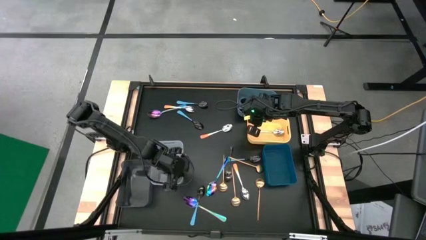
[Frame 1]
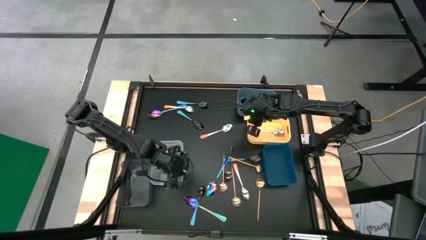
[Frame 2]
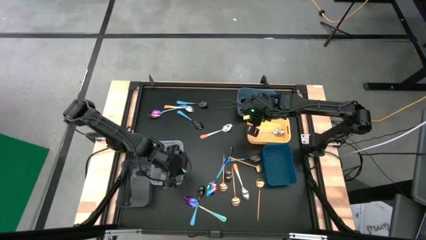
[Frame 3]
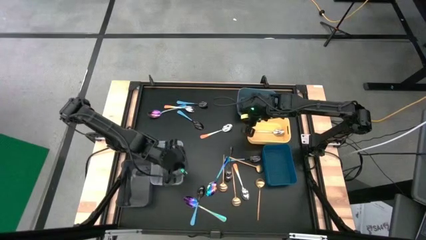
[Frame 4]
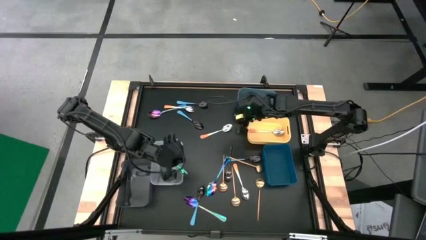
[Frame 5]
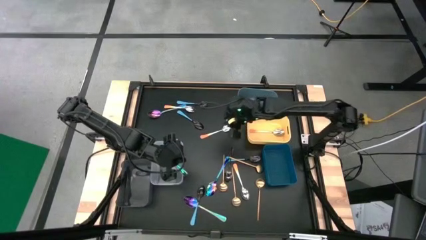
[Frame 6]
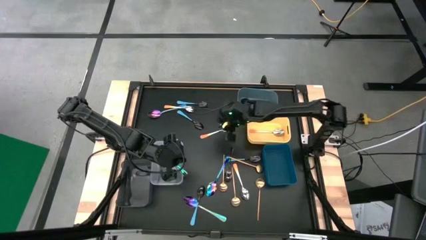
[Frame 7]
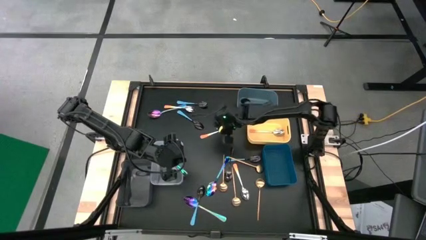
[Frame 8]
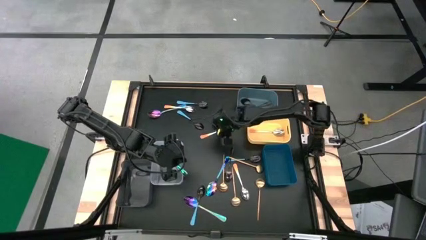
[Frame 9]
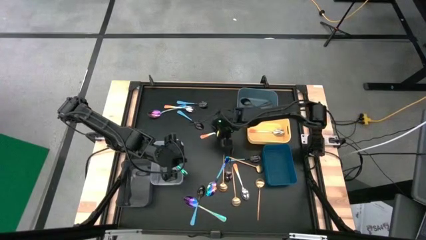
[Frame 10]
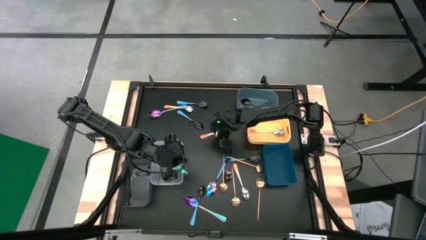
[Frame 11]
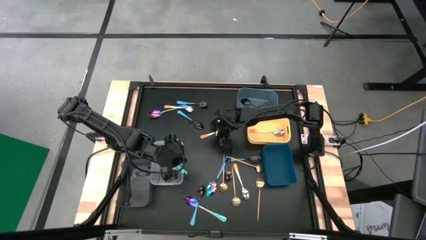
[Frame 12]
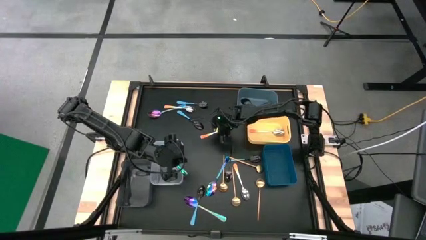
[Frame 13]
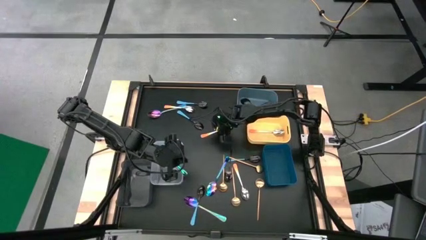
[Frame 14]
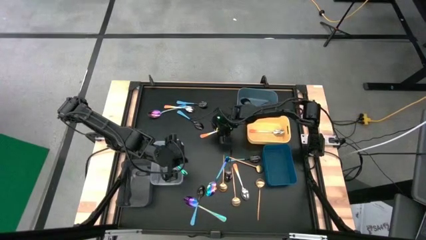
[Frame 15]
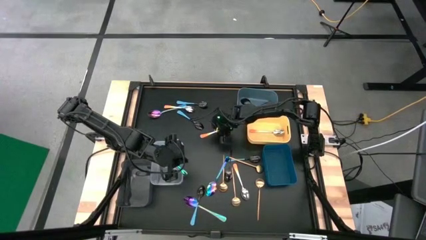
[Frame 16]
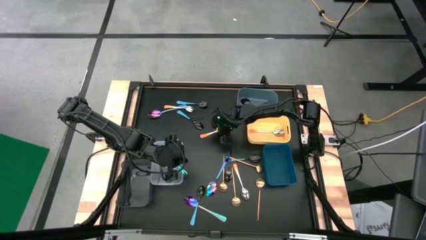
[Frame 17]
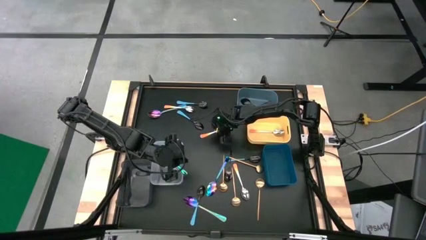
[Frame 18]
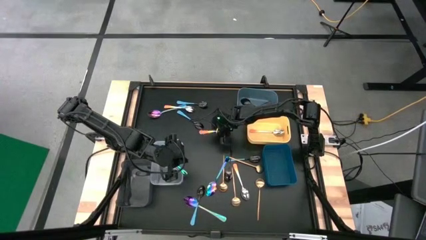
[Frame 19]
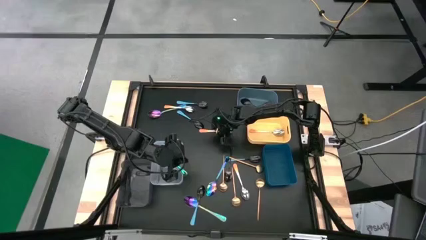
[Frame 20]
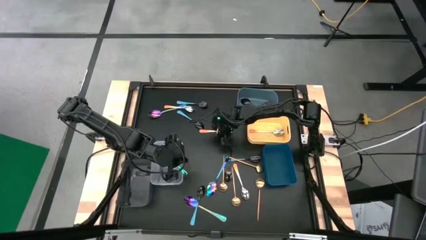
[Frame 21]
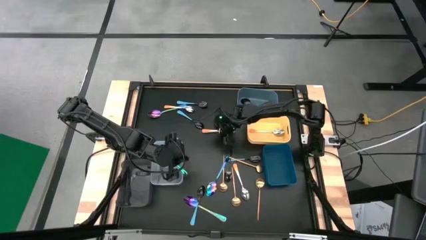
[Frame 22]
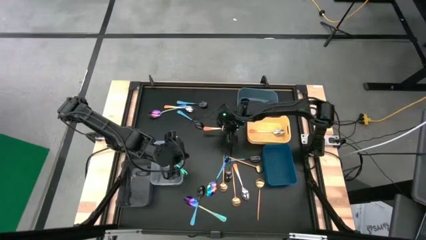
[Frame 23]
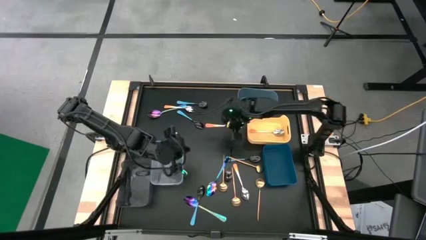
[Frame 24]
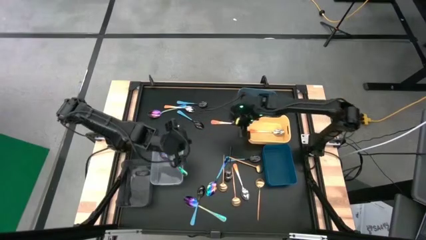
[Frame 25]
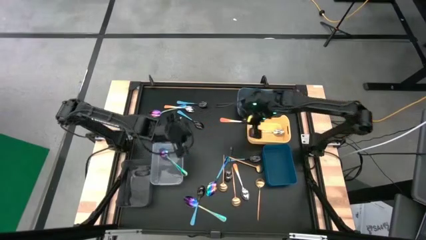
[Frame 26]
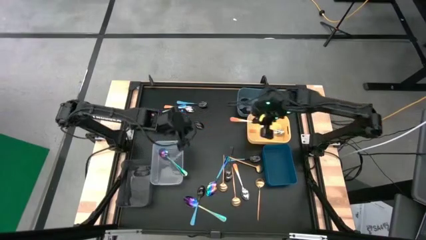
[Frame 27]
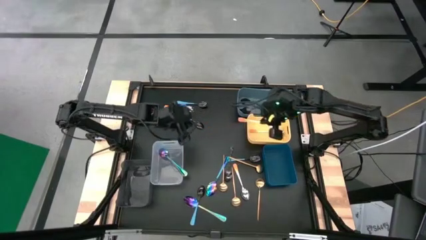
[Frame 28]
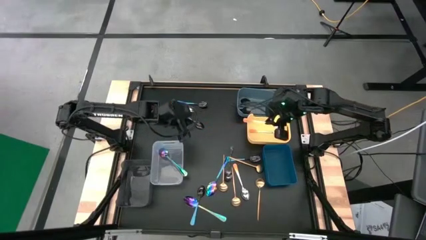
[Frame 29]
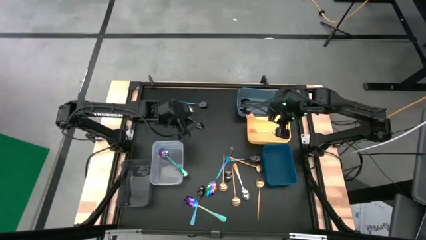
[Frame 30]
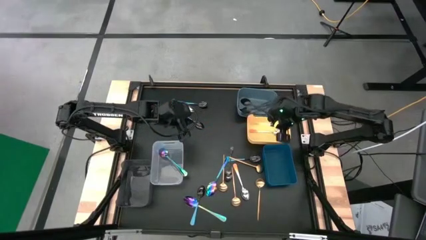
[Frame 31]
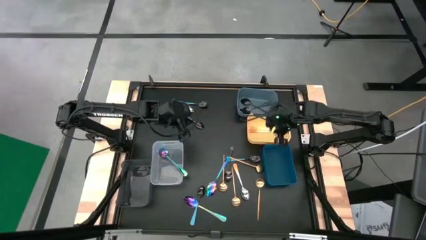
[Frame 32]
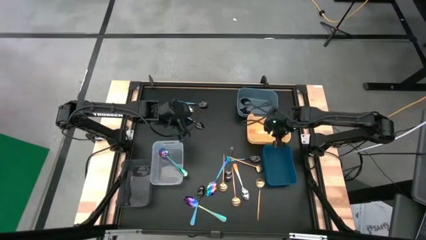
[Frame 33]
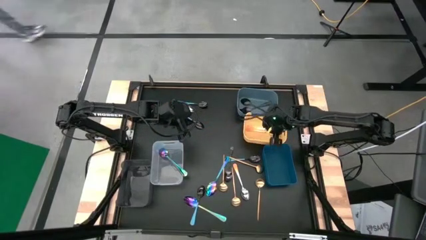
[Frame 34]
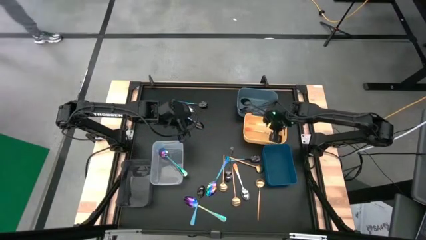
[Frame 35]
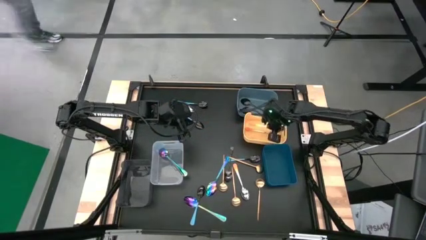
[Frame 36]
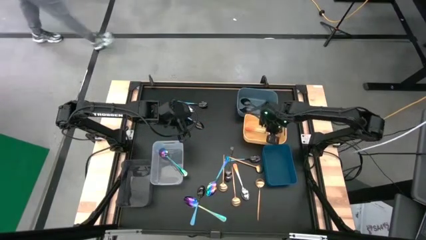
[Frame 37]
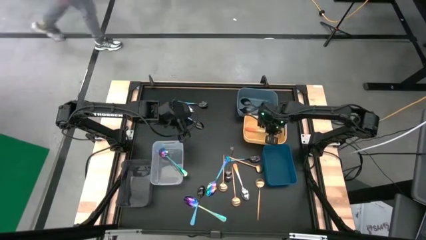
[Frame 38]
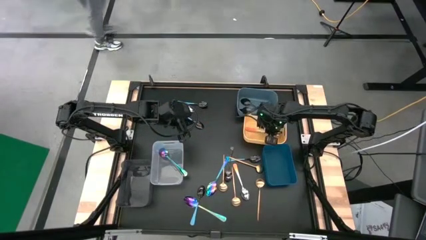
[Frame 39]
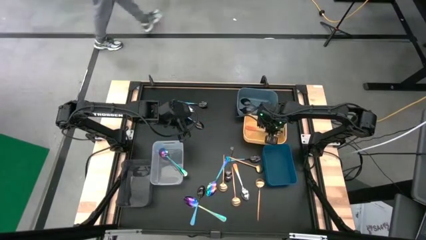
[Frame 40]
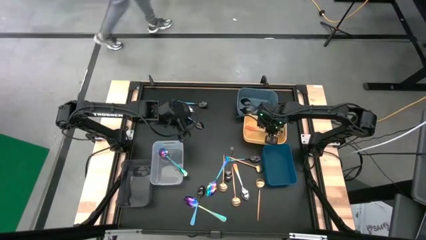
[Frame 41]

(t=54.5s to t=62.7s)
Task: Sort silverware by color (type)
Put the orange spoon into the yellow bin

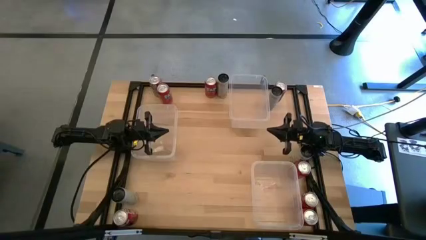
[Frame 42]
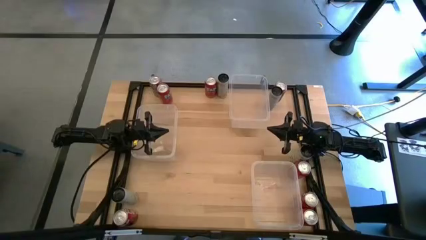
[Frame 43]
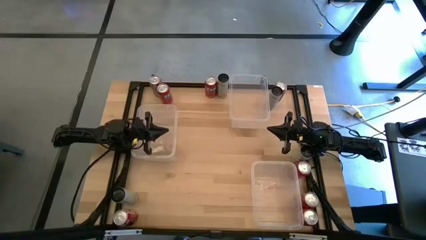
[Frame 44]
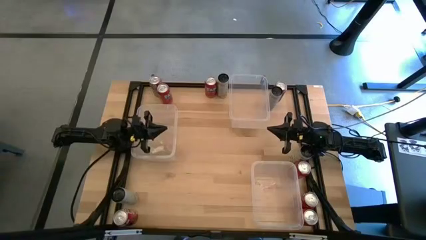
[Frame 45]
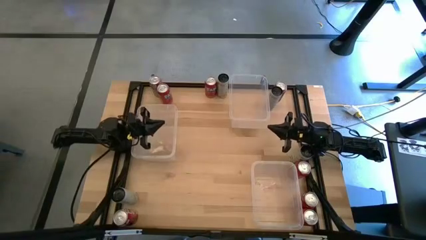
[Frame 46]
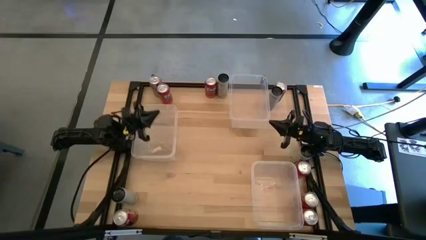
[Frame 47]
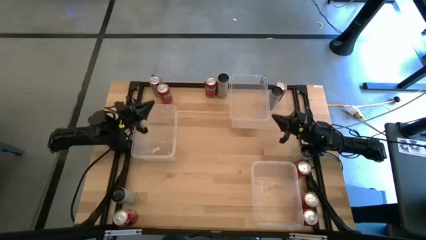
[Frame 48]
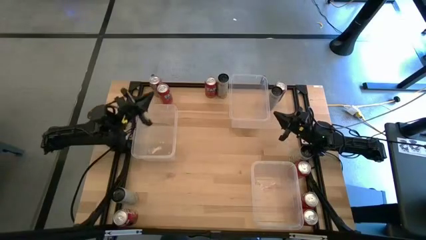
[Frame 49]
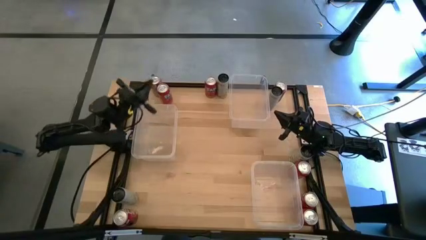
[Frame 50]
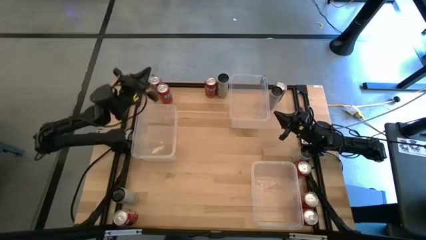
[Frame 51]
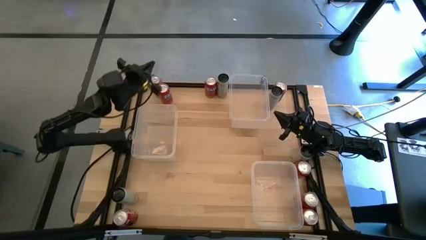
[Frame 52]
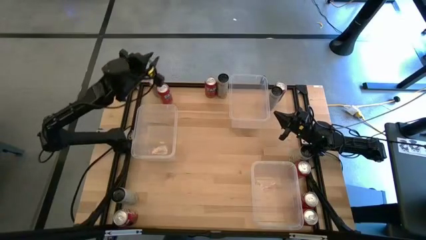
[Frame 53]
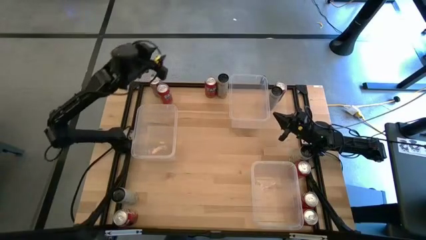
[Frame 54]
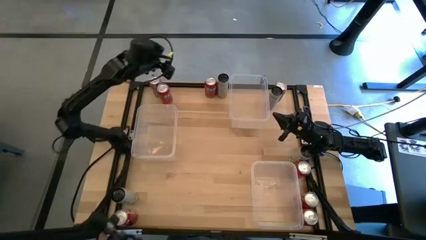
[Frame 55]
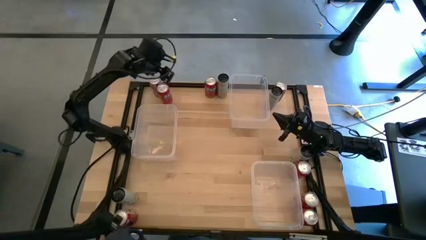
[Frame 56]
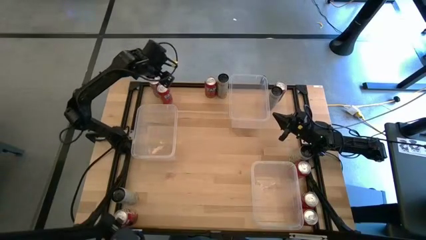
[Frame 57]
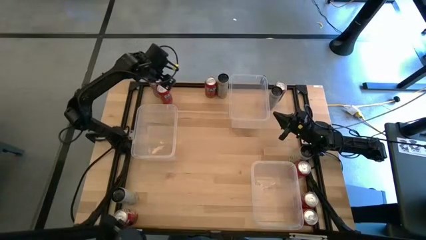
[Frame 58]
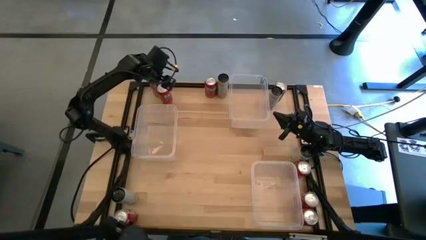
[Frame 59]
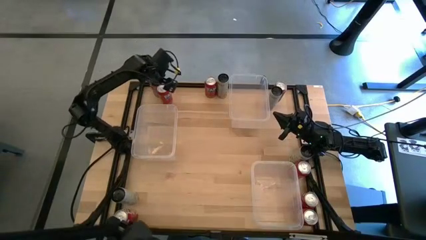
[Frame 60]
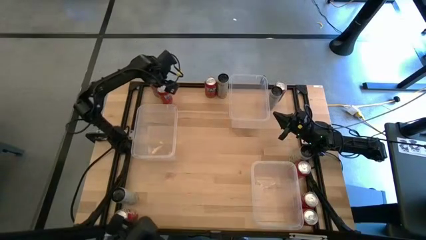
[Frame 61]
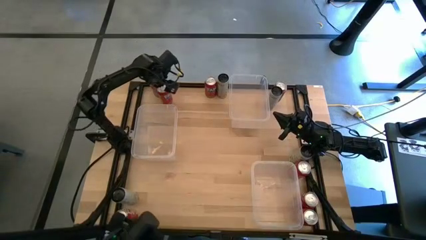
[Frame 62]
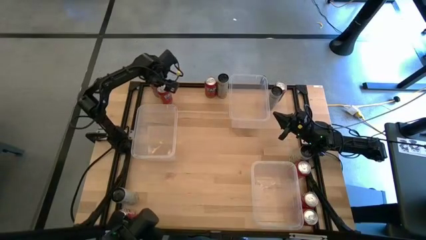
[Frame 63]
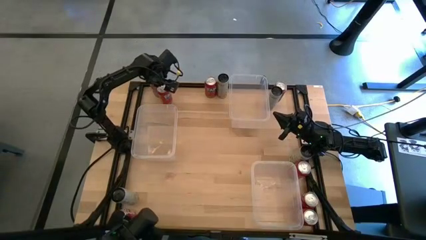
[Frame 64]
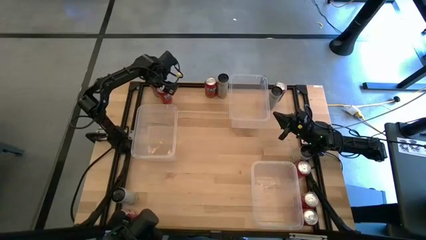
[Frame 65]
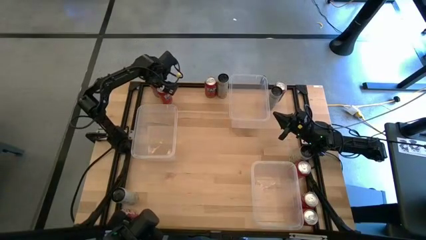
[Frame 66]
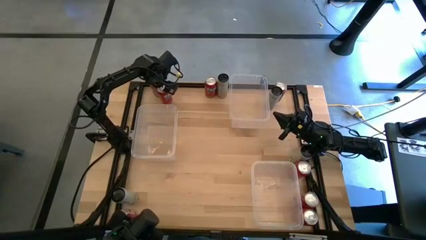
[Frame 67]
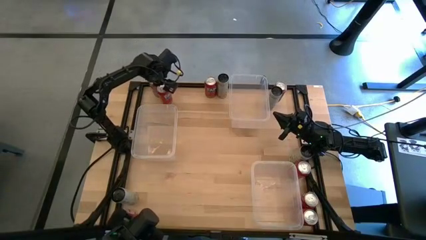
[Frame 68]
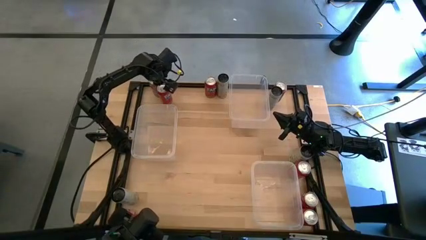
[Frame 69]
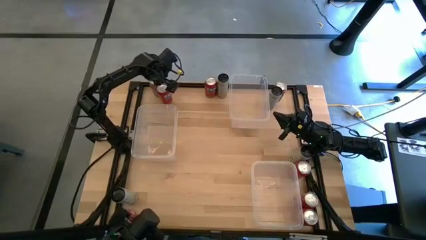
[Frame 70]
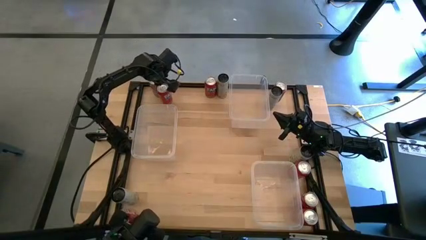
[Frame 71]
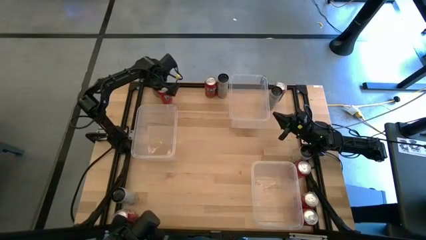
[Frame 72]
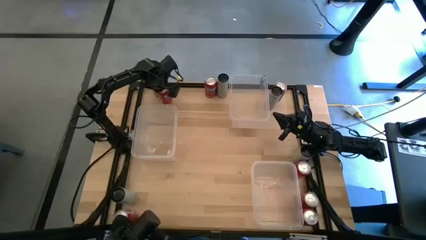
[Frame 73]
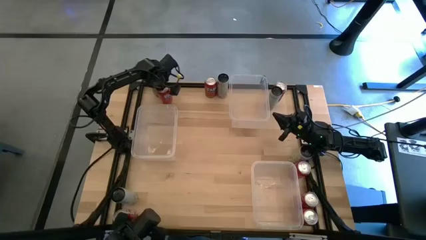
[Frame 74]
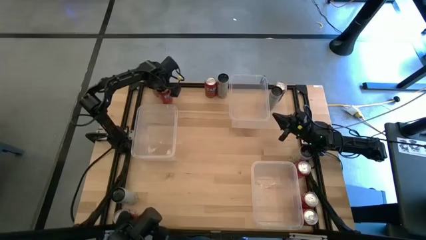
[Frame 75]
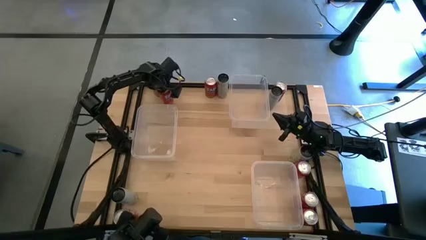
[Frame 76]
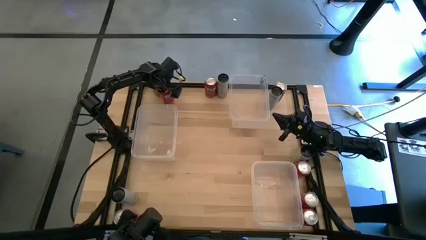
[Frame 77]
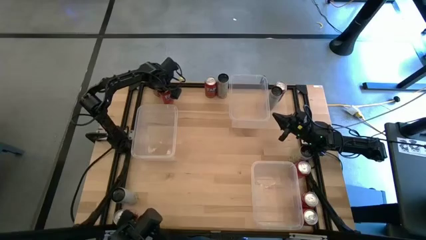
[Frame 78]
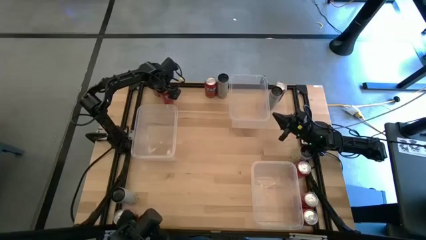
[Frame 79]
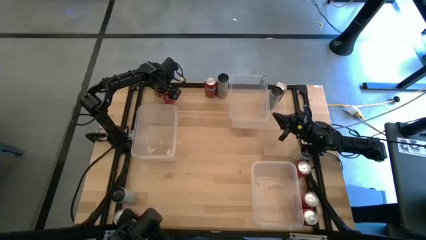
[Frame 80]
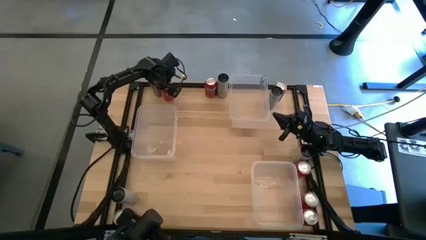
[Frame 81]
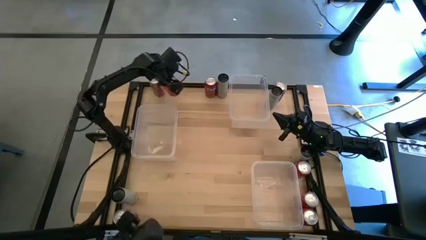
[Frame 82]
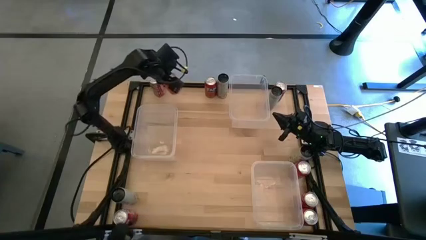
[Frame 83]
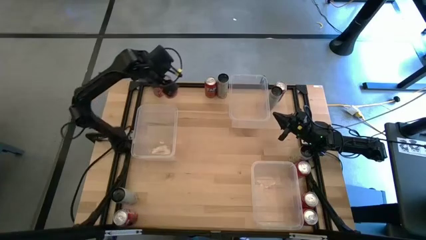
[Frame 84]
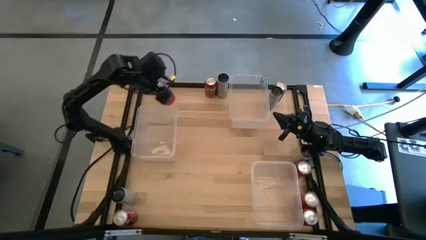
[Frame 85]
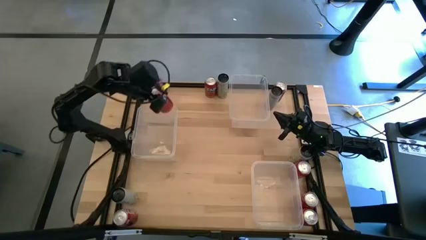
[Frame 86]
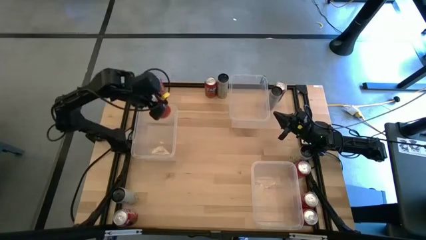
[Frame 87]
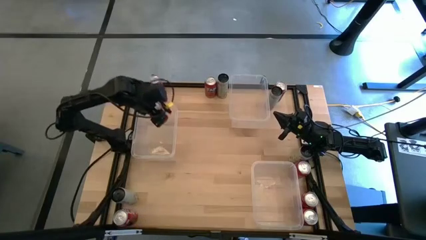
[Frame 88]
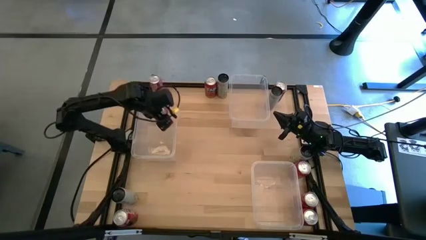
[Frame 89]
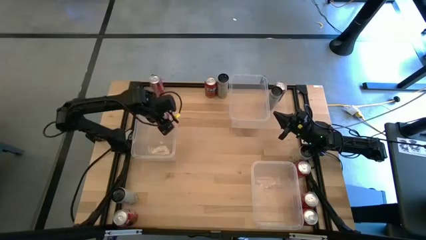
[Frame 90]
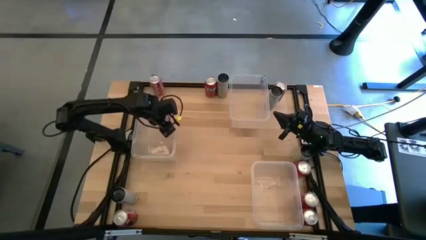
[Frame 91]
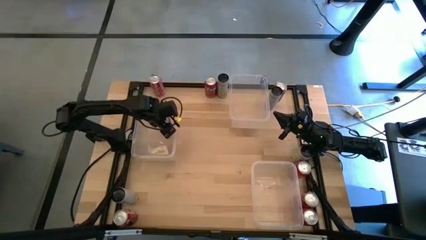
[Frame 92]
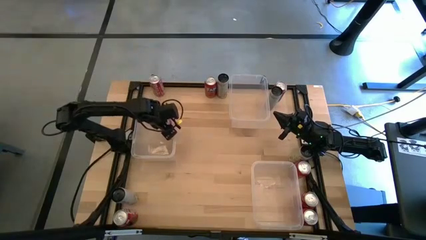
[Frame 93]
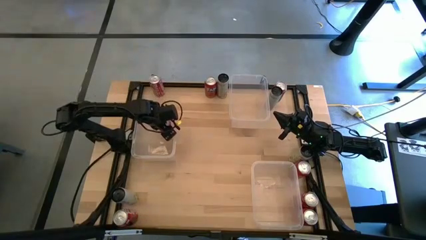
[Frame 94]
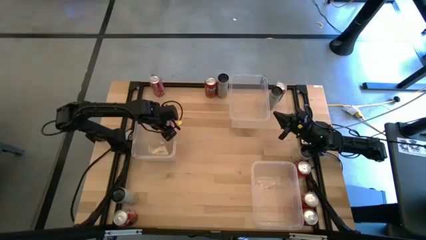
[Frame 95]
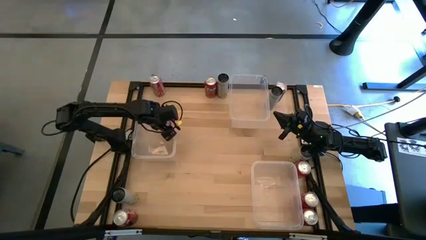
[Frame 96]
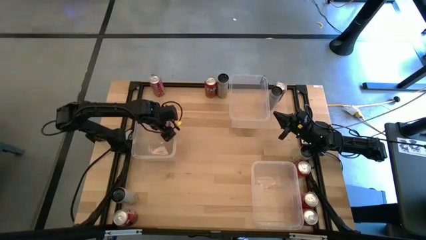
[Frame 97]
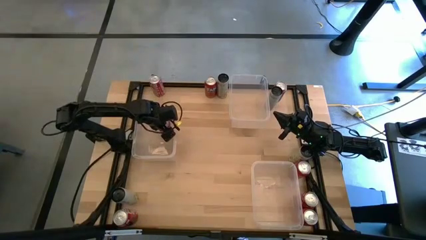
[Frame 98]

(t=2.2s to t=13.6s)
Task: Sort soda cans
Put the red soda can into the middle transparent bin
